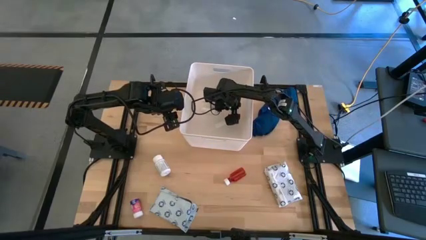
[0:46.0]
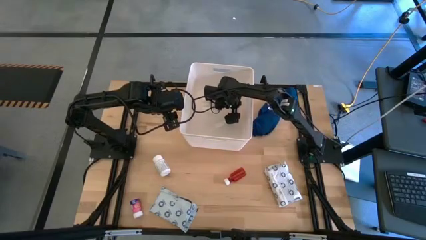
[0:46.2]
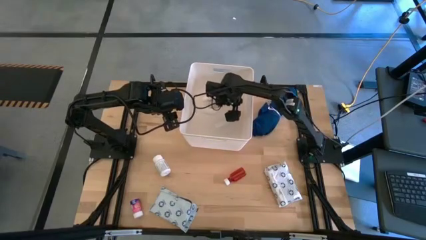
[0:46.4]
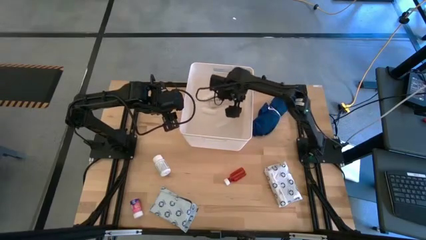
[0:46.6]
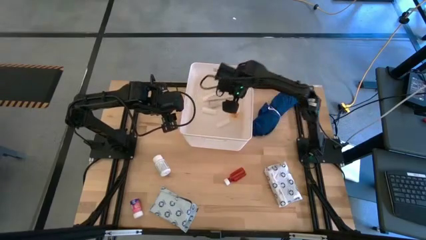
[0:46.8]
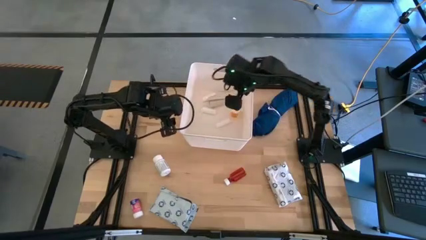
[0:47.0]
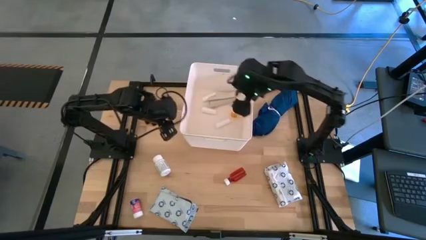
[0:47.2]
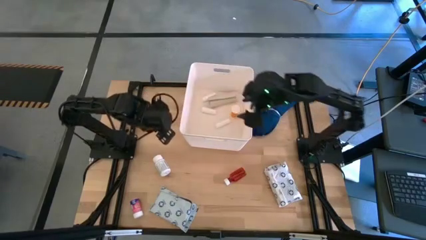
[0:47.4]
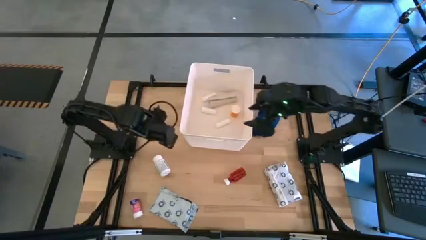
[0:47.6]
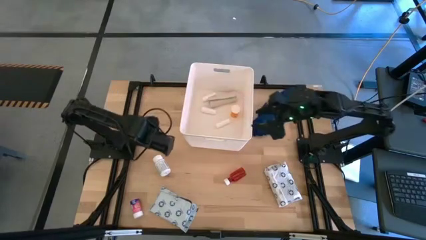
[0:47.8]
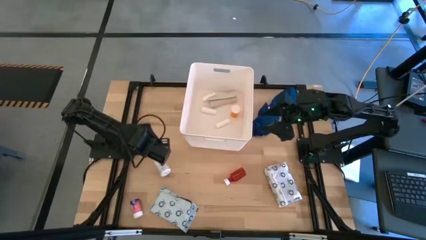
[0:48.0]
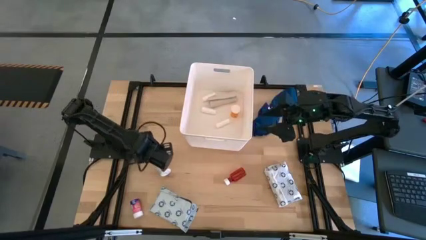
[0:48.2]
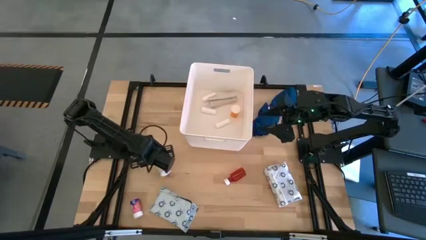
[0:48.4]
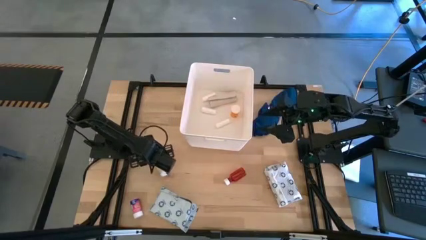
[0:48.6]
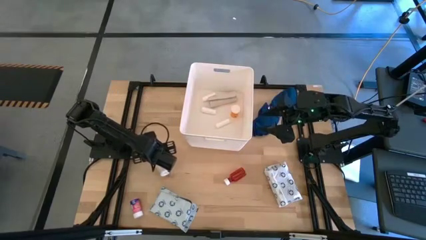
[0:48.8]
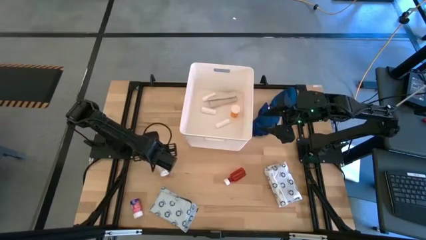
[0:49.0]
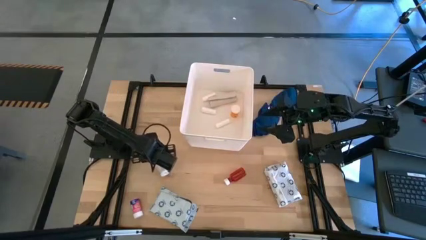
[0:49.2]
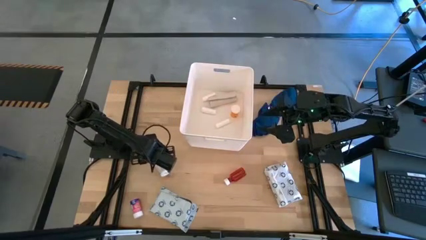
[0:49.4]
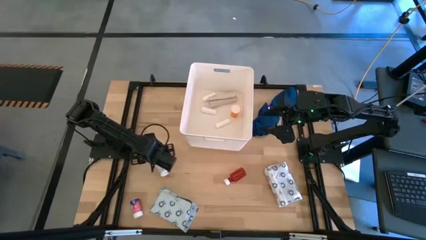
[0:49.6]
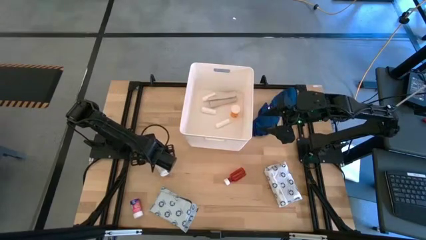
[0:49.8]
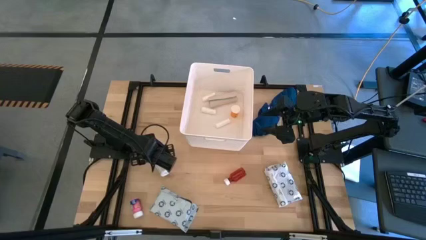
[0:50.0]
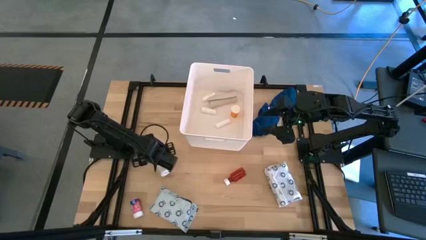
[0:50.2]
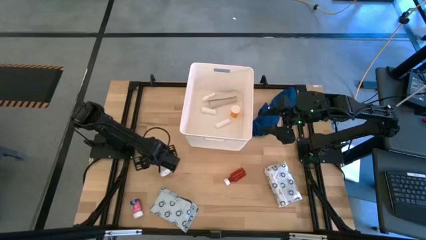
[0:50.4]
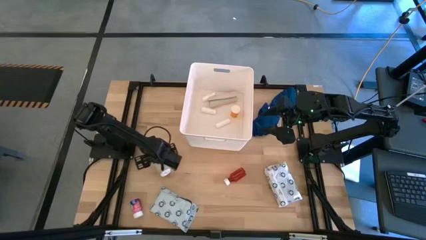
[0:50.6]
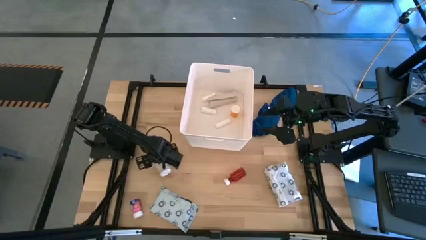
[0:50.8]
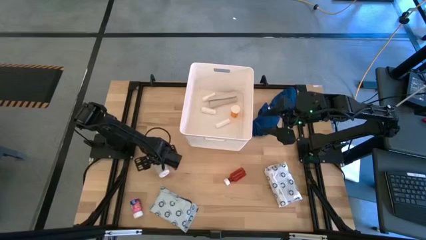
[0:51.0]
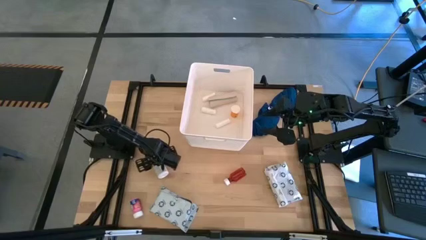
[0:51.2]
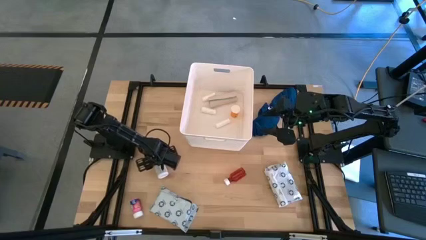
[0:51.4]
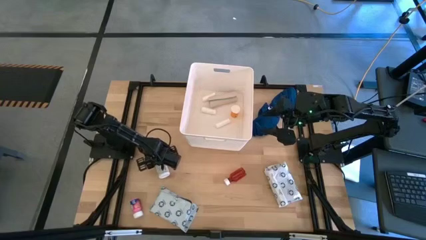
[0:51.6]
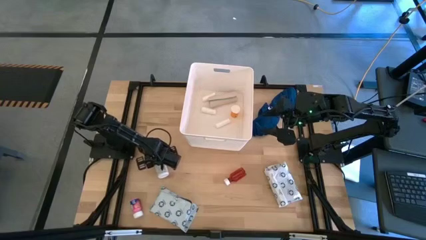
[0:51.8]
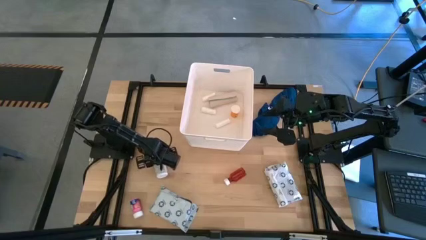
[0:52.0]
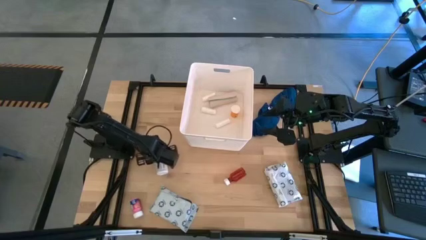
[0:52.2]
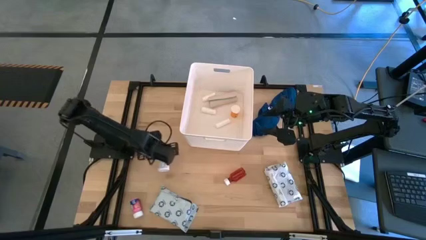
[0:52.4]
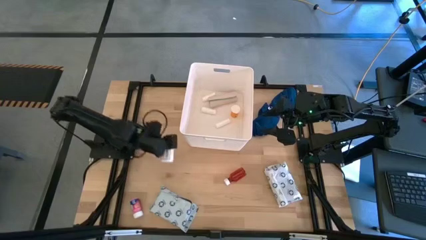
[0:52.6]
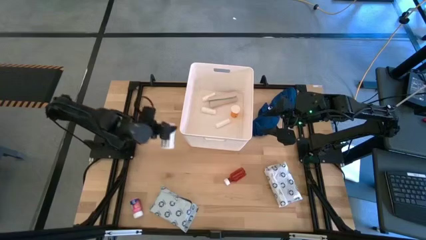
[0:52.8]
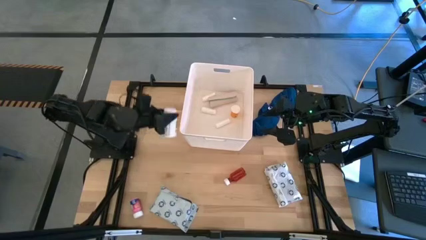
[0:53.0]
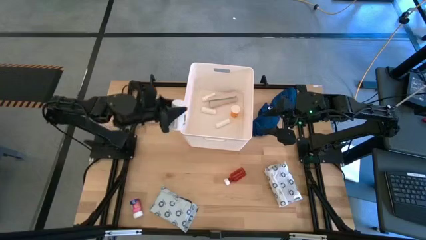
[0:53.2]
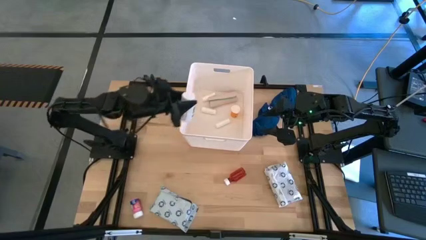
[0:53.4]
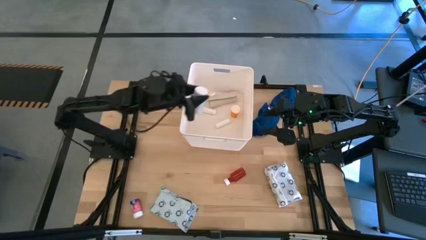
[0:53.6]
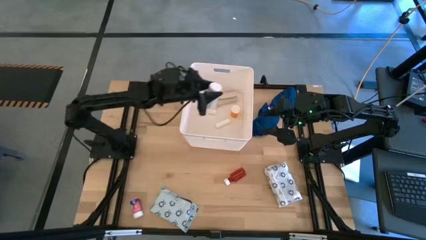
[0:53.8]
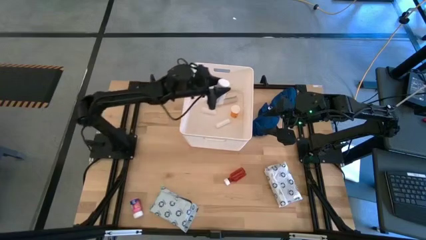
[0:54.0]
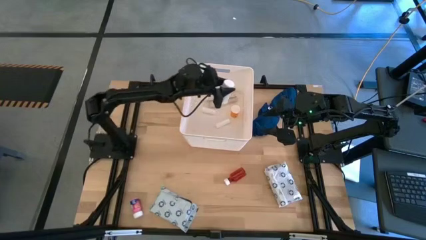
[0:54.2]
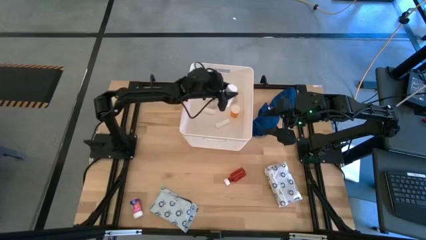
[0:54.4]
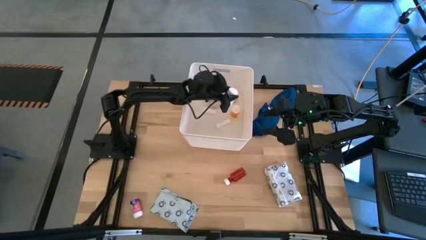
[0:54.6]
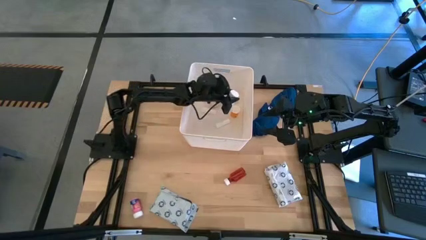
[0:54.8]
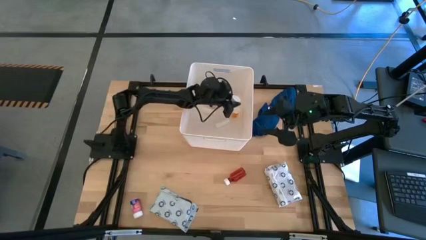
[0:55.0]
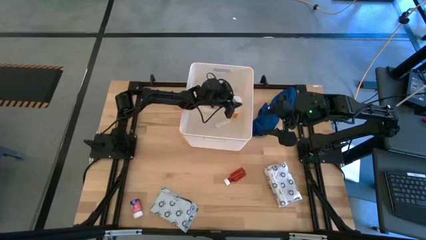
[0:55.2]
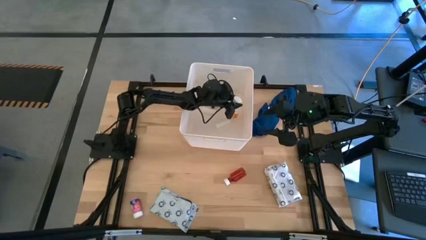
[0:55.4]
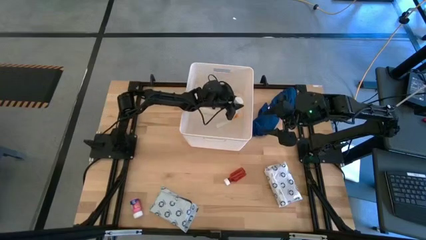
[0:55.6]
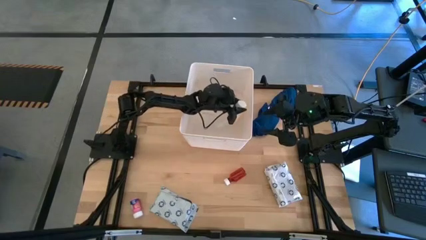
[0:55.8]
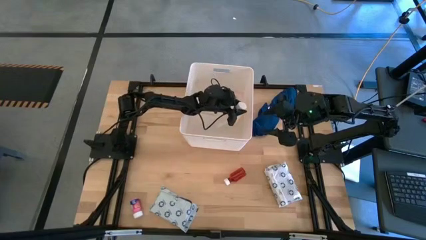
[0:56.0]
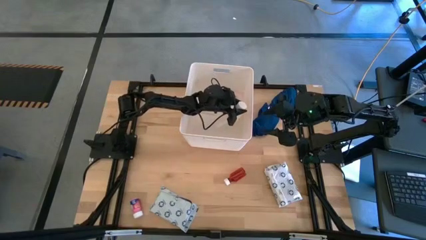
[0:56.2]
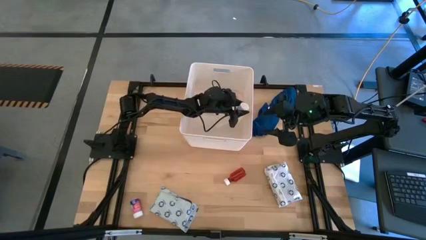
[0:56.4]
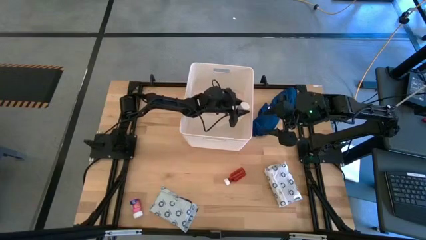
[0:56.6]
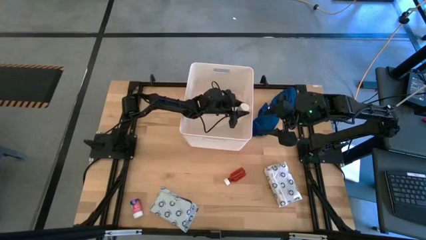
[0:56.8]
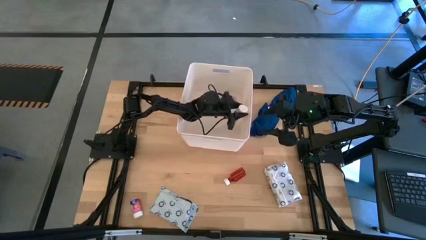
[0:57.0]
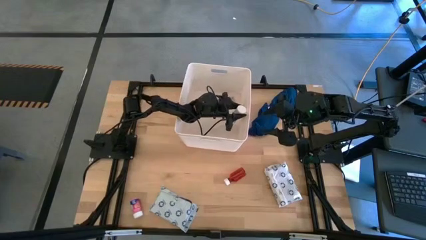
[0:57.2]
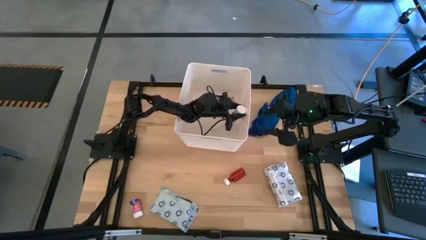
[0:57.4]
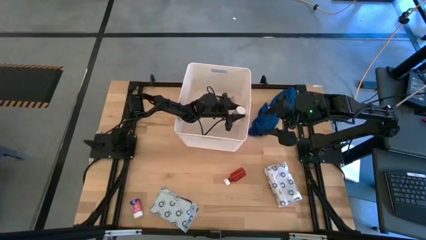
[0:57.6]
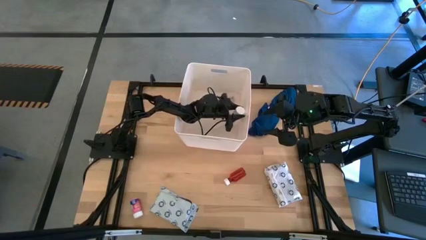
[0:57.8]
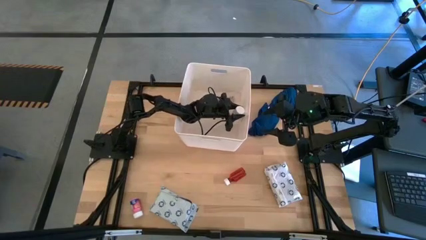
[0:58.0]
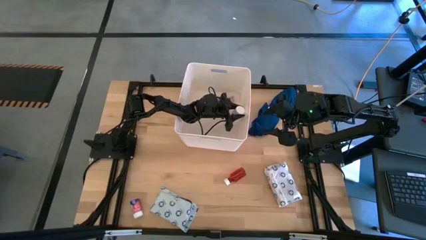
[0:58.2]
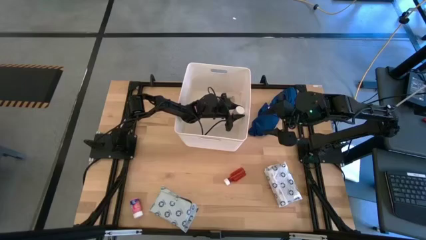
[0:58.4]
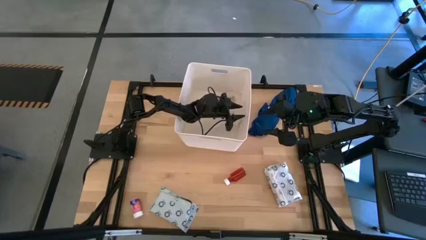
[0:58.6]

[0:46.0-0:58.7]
Task: Pick & place medical supplies in basket/bin
Put the white pill bottle into the white basket

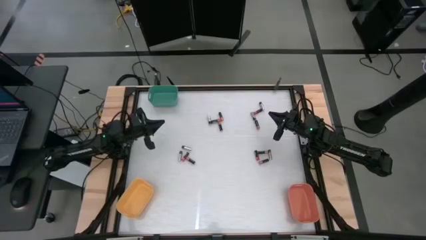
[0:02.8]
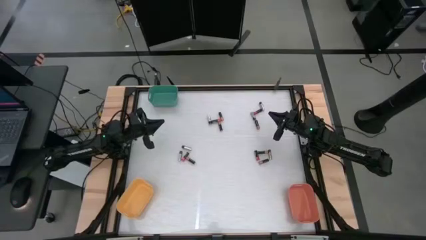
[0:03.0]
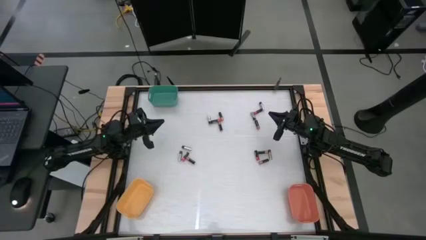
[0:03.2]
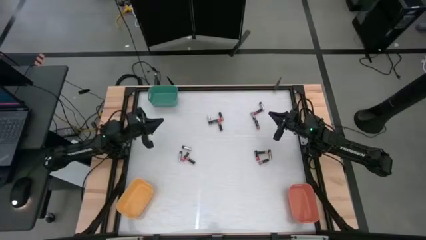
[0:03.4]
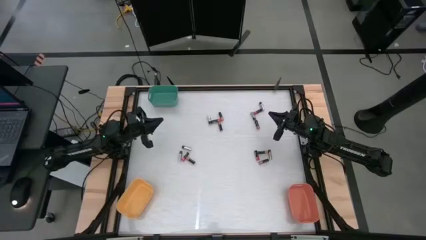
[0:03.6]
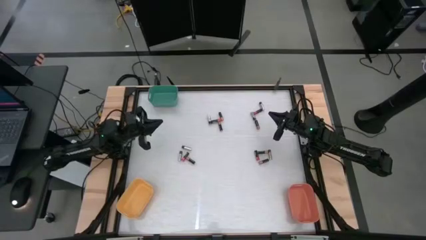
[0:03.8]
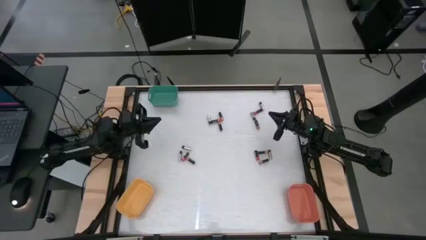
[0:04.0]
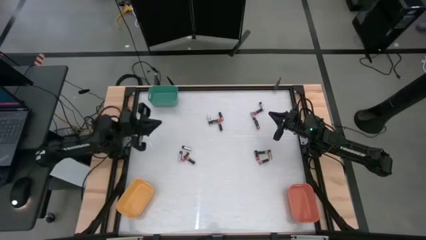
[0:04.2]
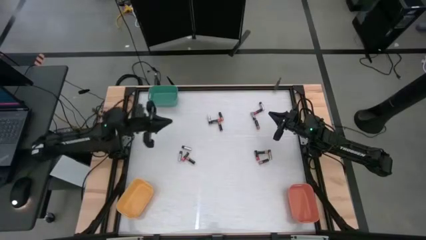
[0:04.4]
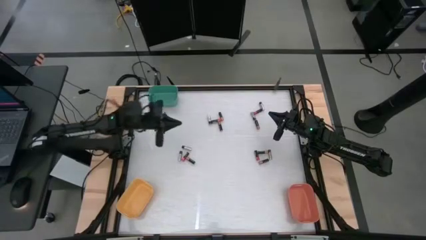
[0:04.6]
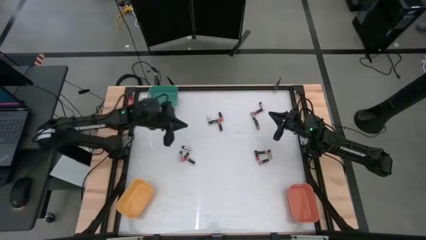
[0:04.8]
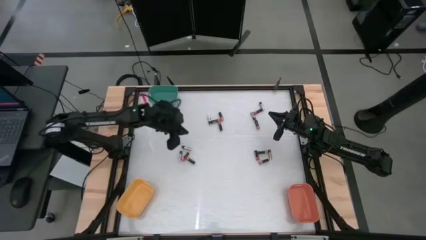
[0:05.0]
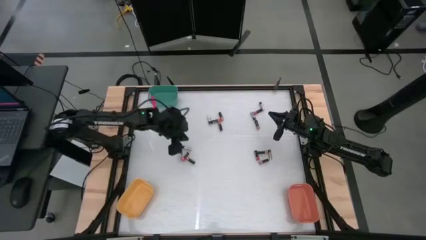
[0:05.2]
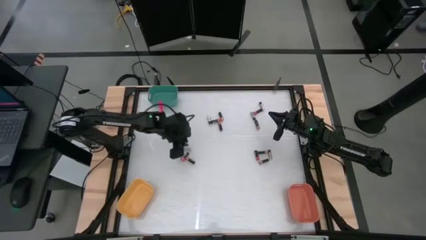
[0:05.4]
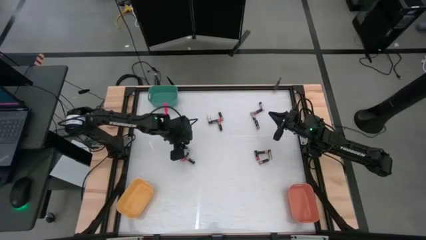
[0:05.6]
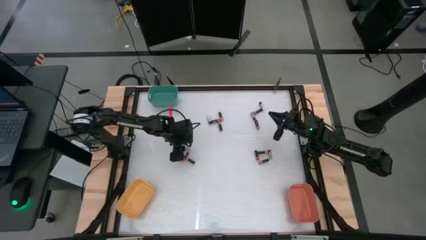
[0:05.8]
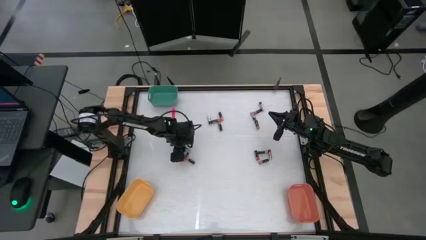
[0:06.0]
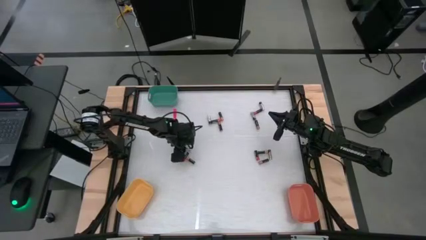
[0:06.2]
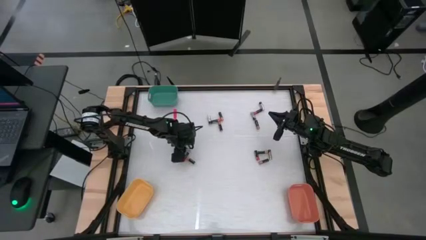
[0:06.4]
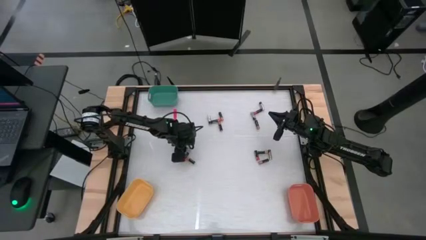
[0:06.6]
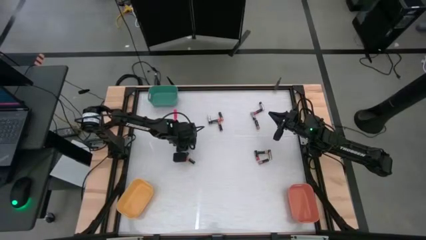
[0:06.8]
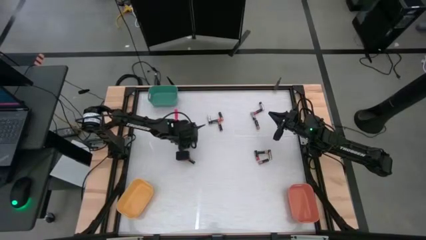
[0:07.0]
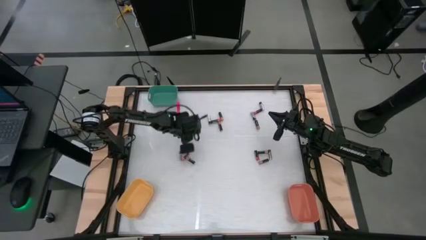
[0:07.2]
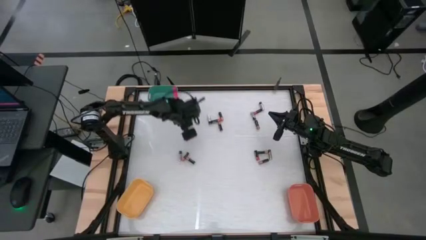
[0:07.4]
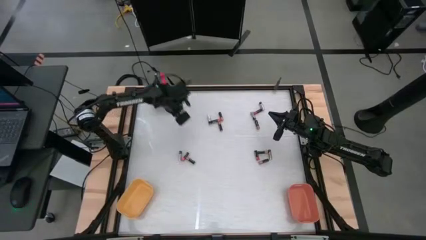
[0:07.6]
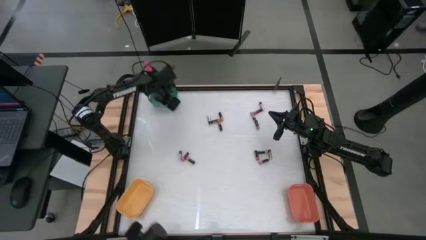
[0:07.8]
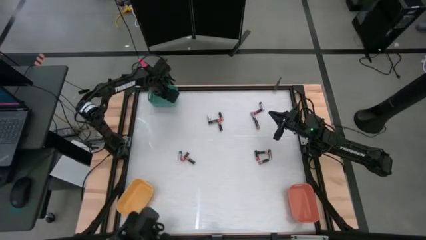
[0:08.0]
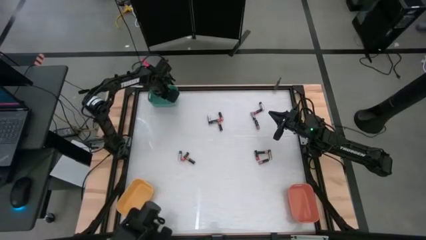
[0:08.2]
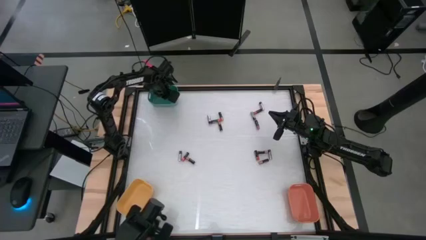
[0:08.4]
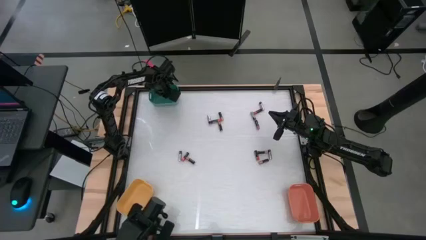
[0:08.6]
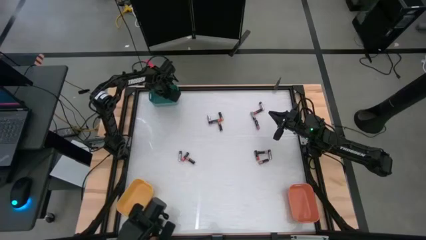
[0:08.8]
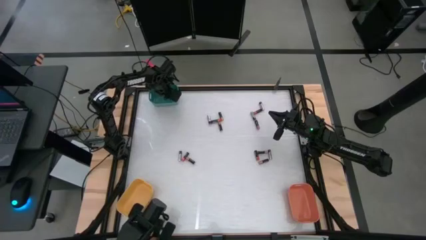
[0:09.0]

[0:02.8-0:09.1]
Task: Sort batteries
Put the middle left silver battery behind the red battery into the blue bin
